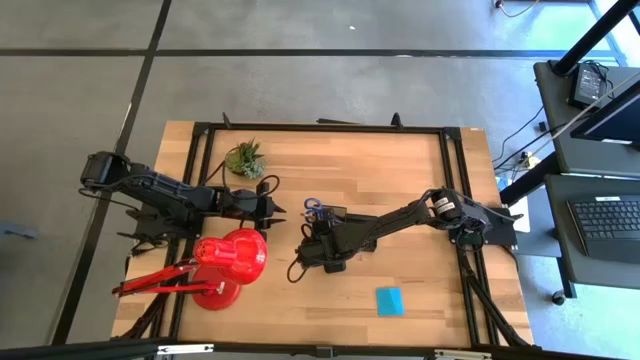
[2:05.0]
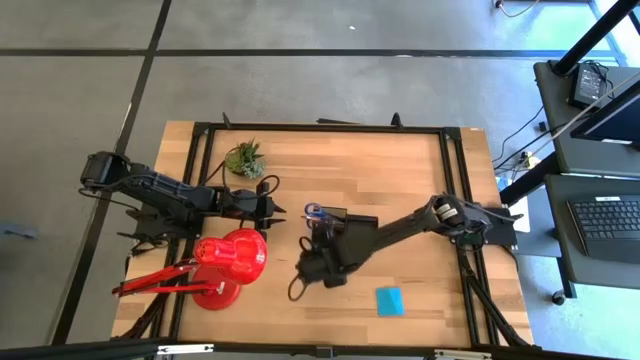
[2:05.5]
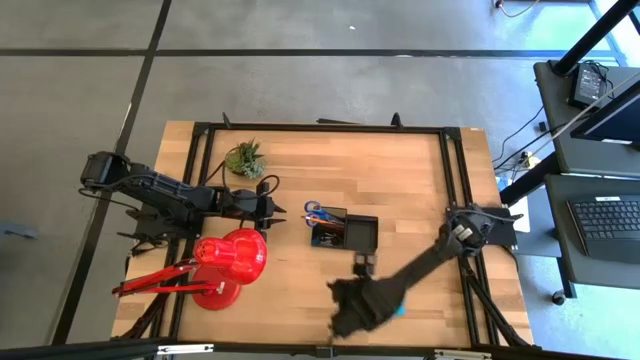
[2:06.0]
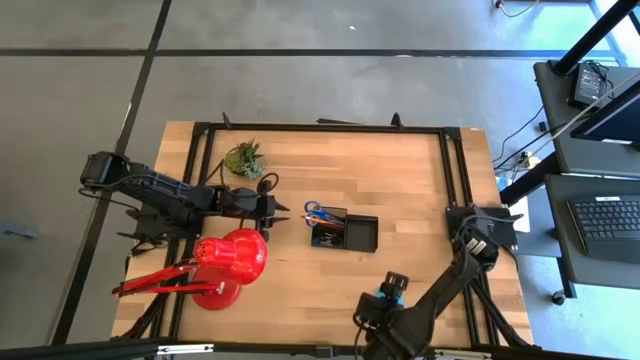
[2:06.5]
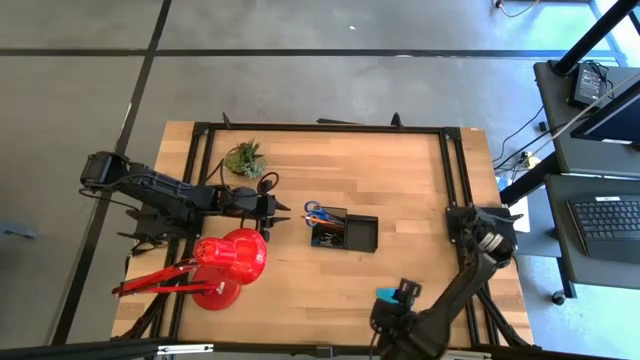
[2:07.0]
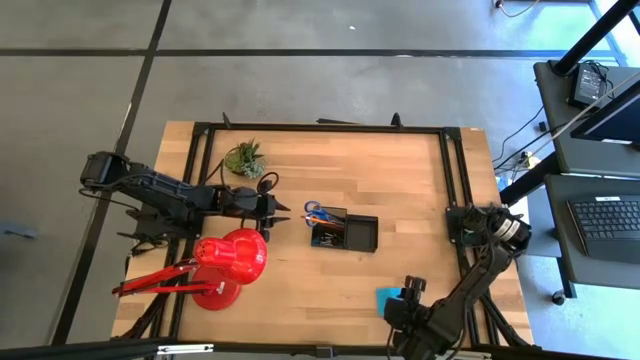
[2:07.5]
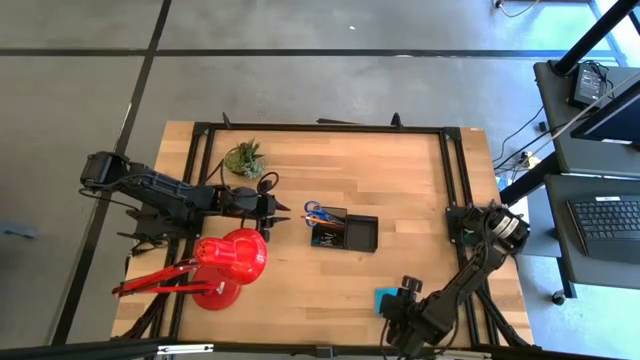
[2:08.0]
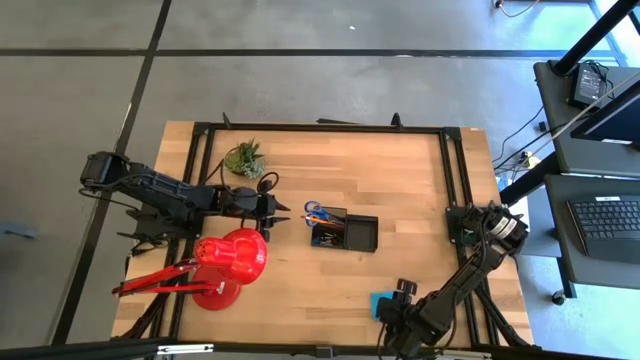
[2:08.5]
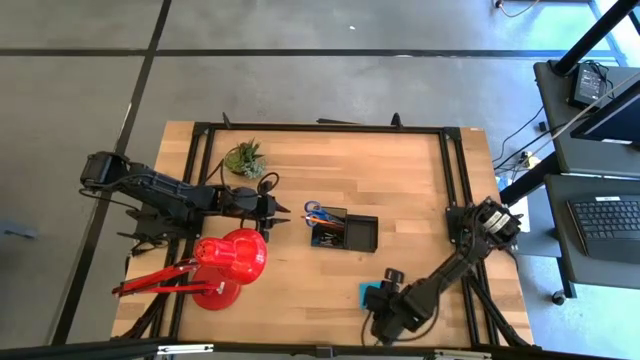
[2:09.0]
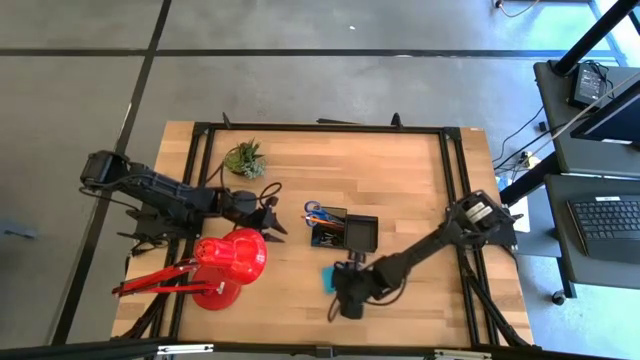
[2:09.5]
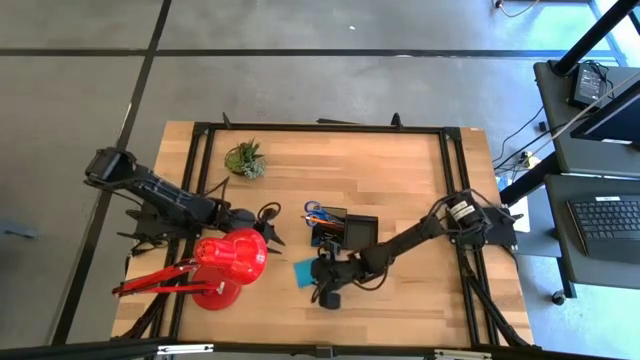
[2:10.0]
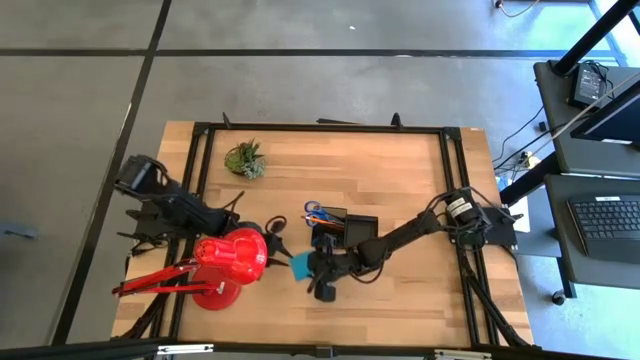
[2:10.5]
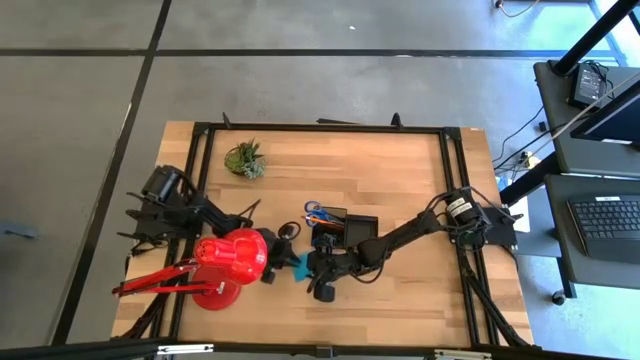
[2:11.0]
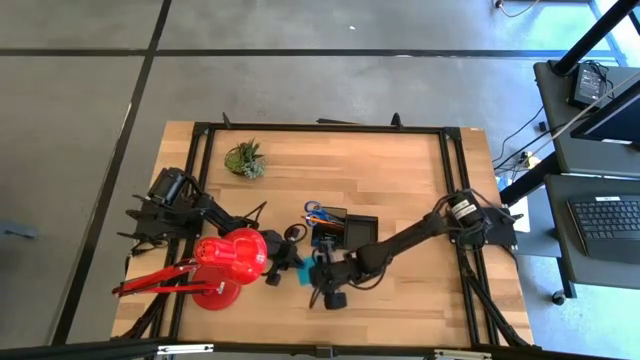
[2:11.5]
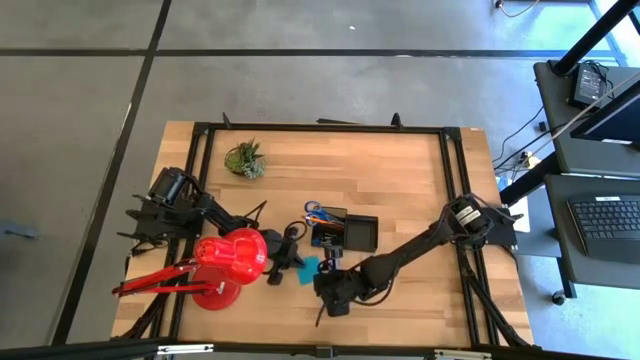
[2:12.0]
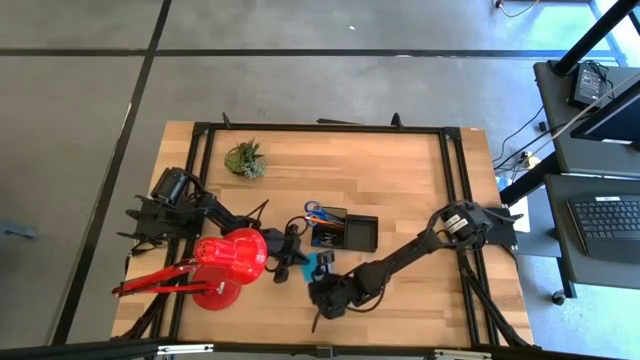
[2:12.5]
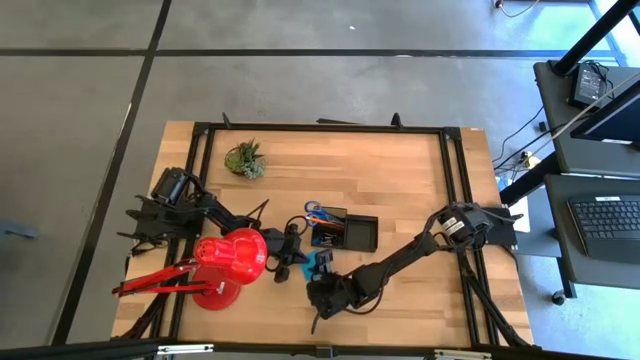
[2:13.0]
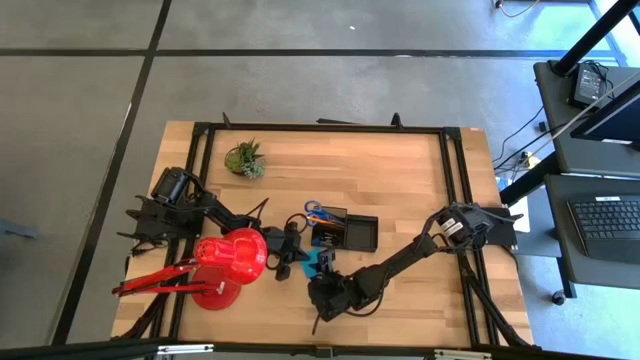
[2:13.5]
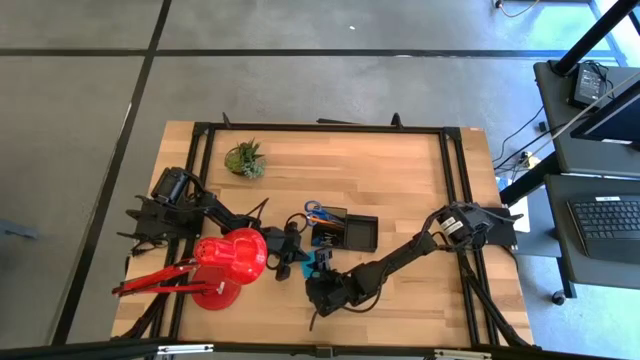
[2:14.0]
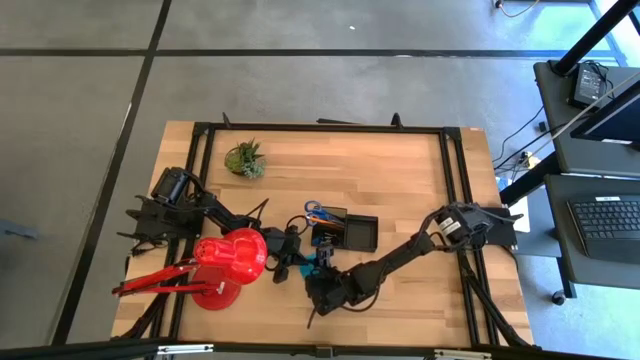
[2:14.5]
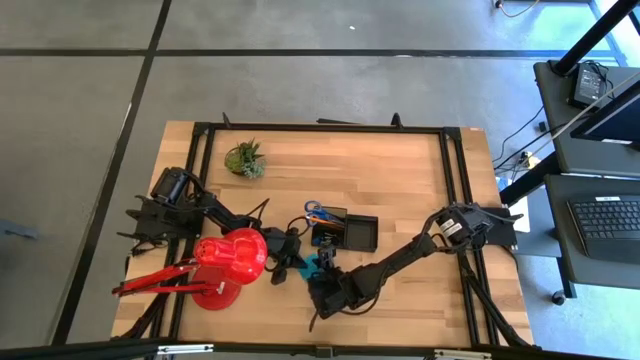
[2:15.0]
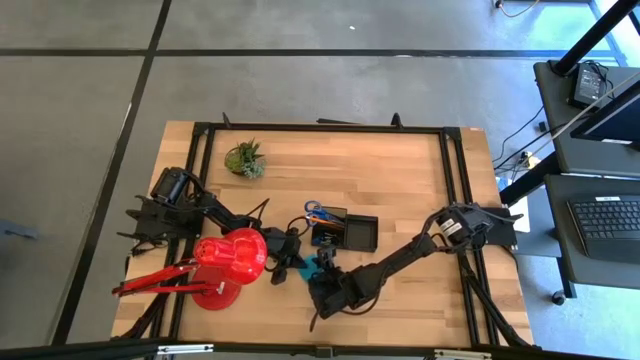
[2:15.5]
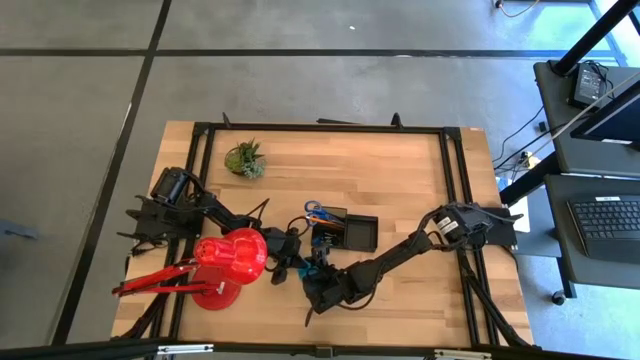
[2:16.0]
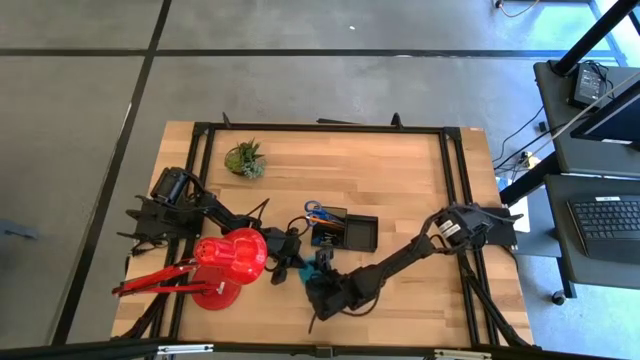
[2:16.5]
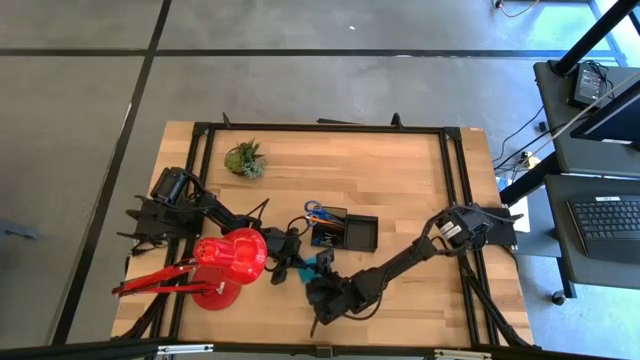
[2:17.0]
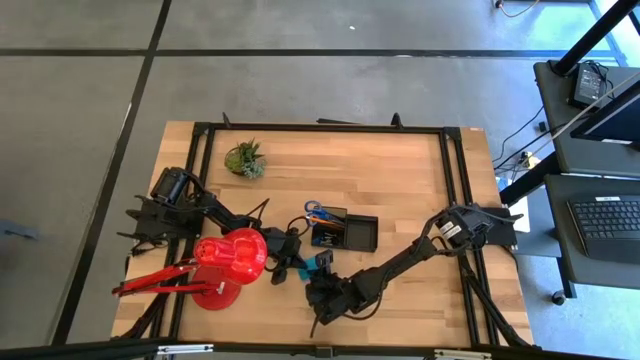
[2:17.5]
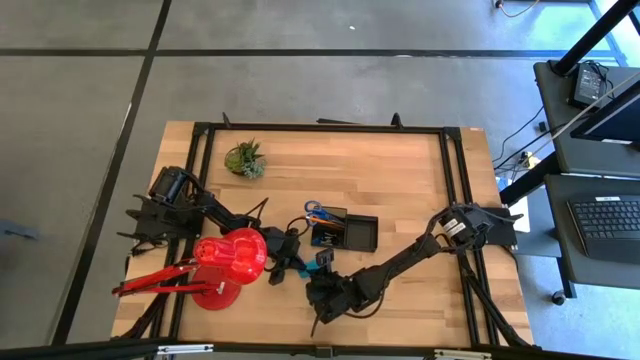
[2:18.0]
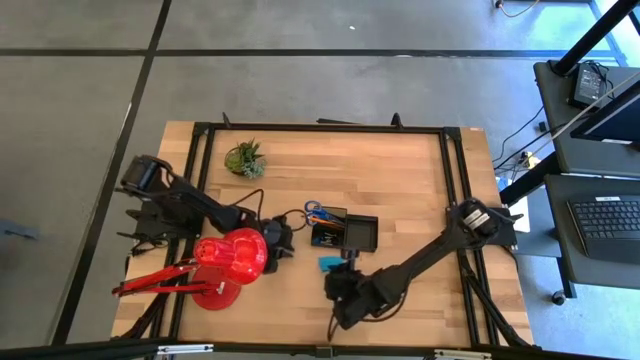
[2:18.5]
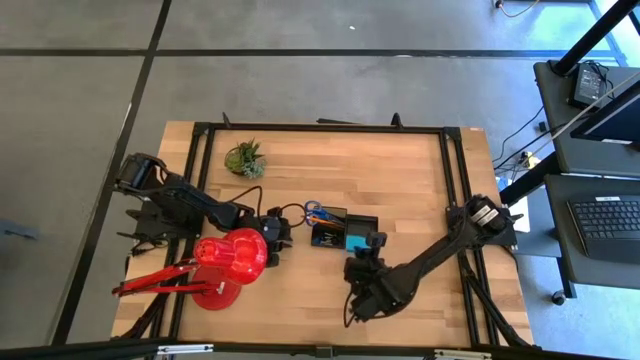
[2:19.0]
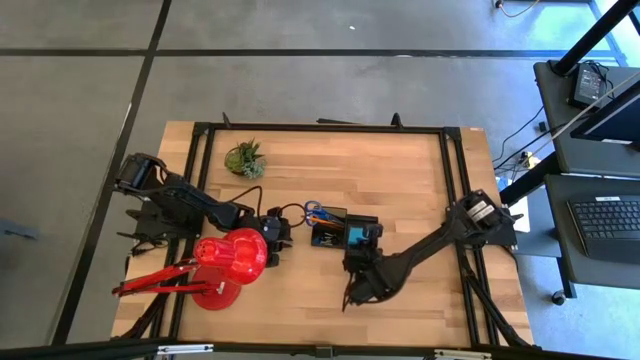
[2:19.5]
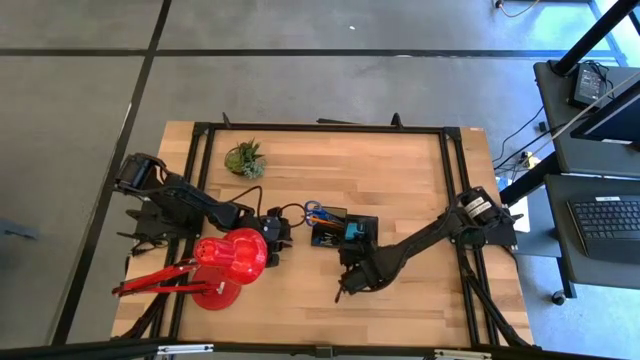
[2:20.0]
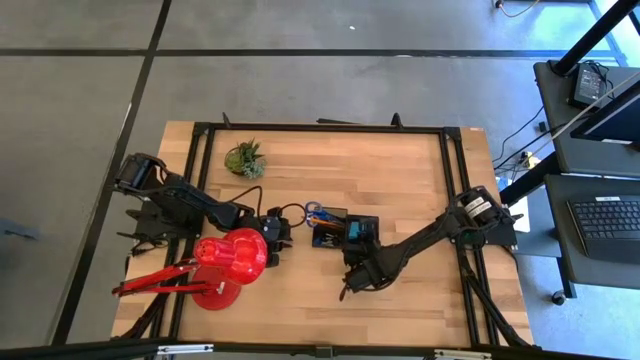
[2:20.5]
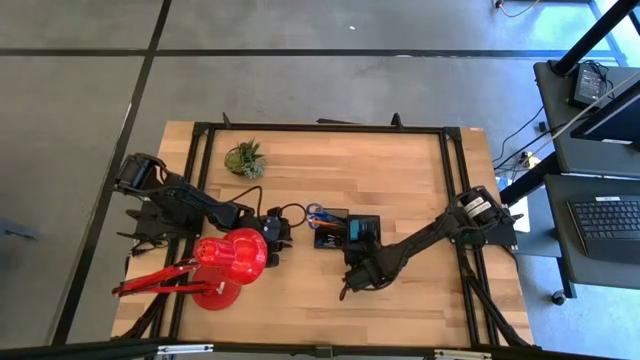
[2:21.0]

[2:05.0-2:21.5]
Task: Pick and place office supplies into organizer
Put the blue sticky note into the black desk organizer

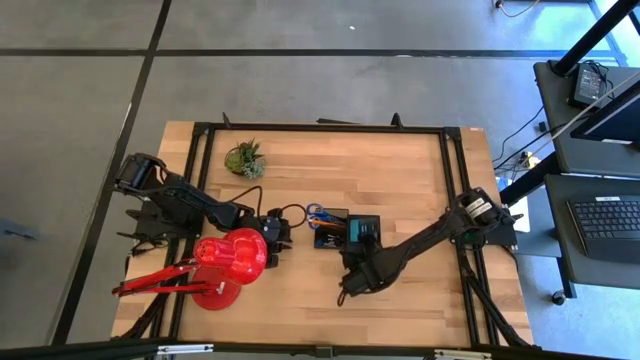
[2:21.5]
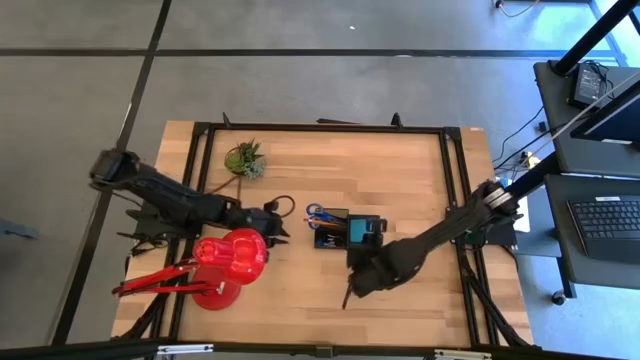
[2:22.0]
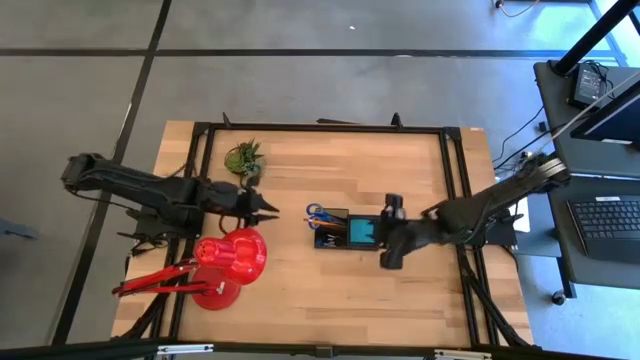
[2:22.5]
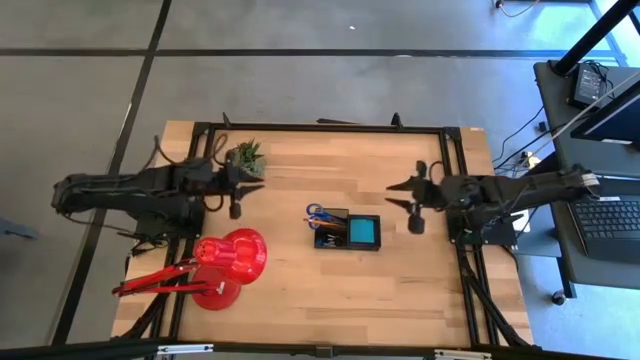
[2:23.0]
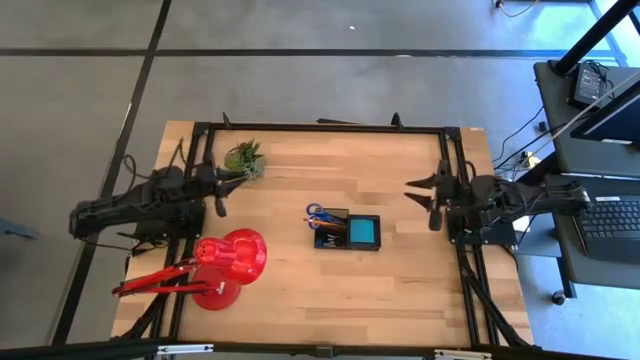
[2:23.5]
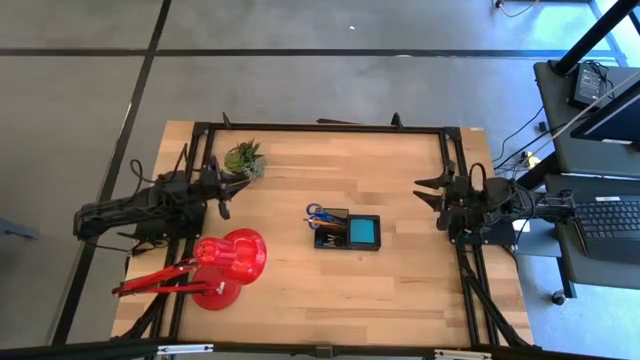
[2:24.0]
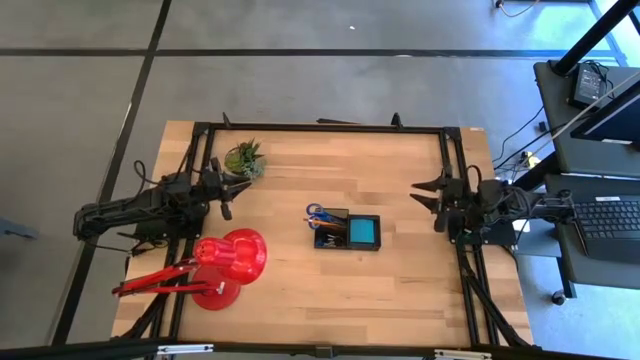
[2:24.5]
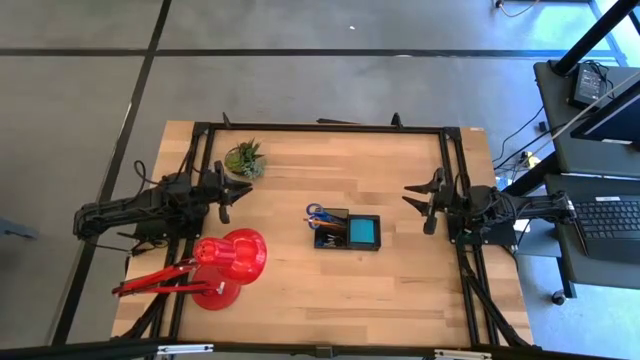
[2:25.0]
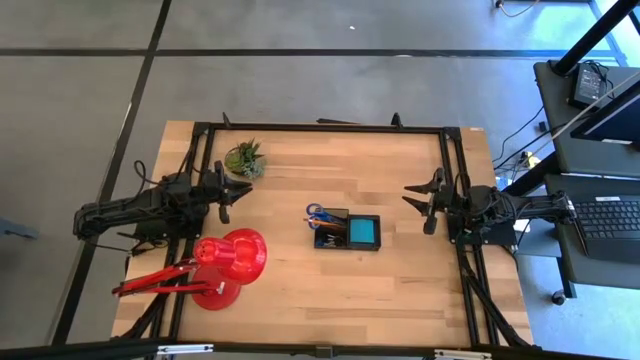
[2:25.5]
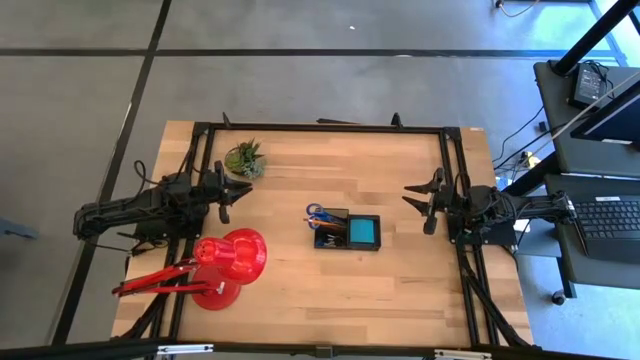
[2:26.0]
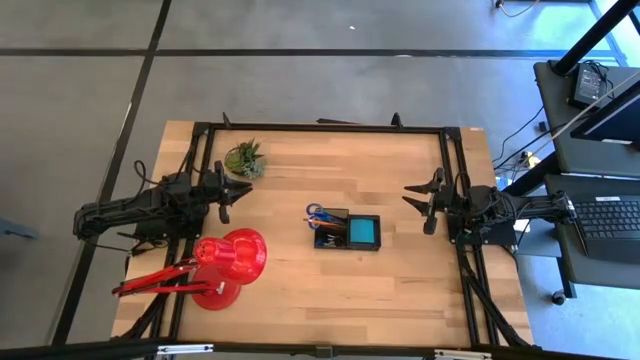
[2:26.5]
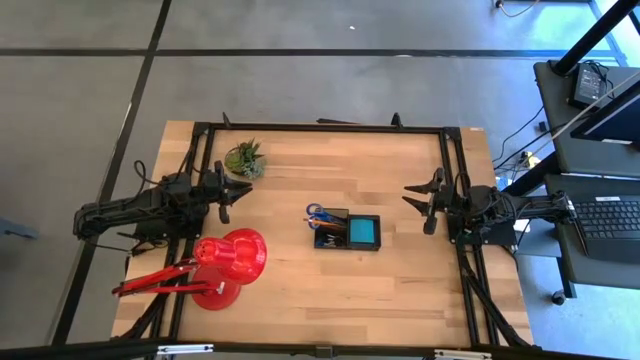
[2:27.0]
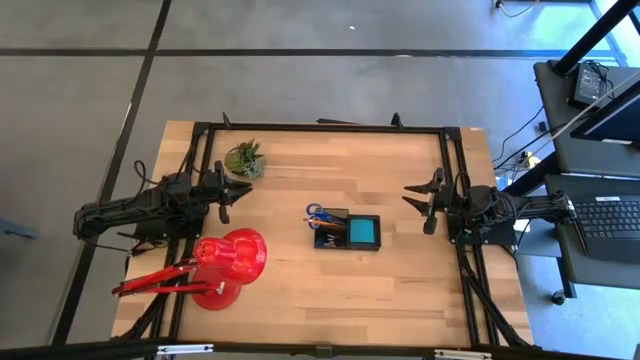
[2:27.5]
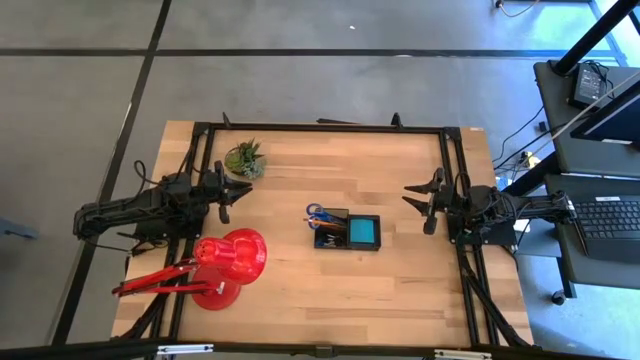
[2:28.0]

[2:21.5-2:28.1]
Return to Home Position
